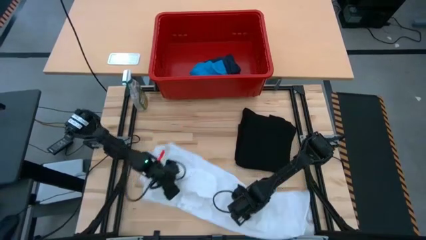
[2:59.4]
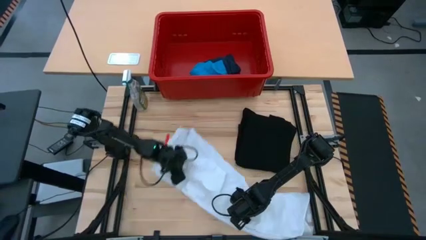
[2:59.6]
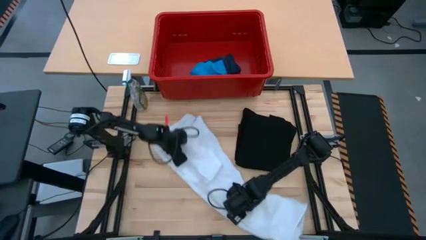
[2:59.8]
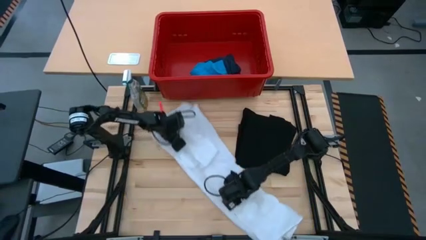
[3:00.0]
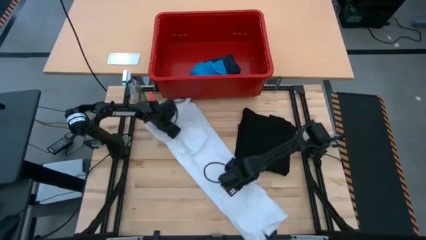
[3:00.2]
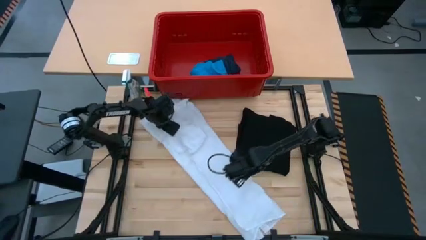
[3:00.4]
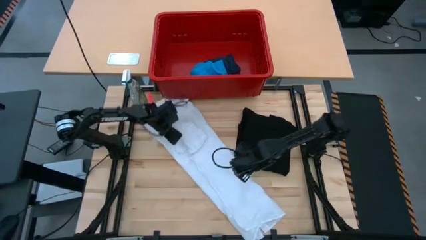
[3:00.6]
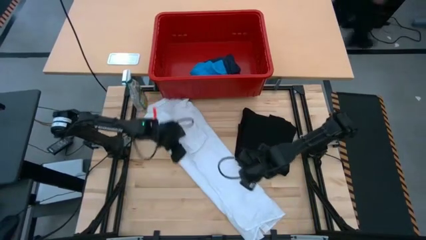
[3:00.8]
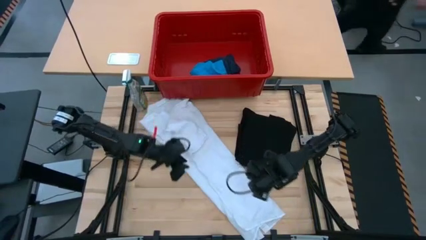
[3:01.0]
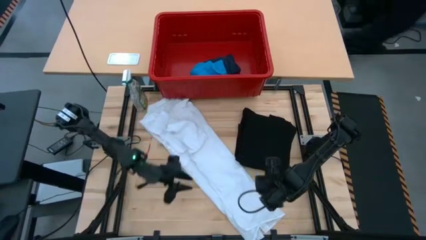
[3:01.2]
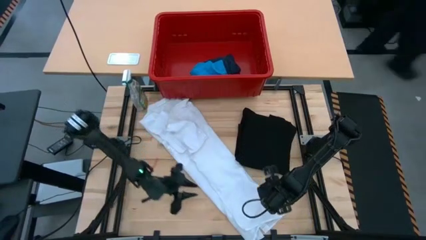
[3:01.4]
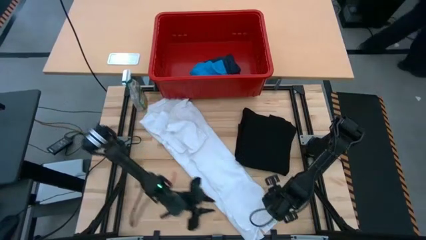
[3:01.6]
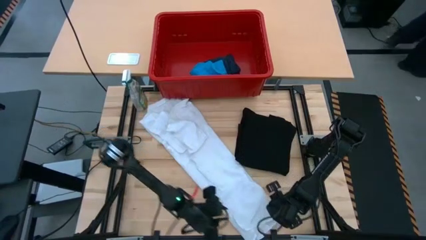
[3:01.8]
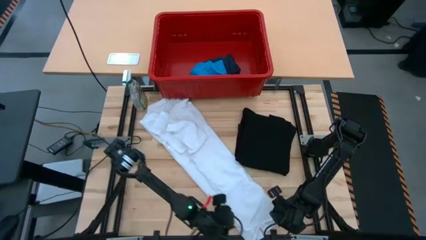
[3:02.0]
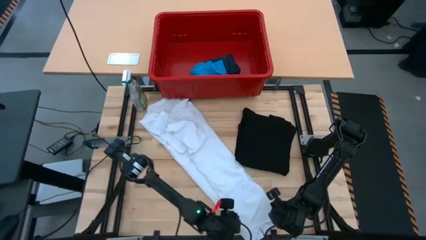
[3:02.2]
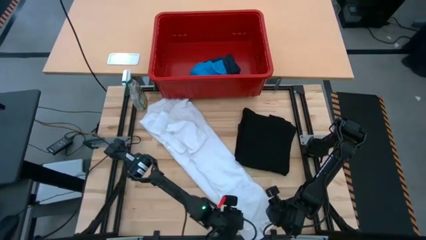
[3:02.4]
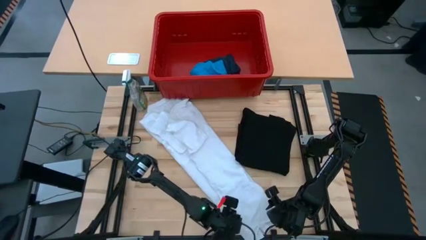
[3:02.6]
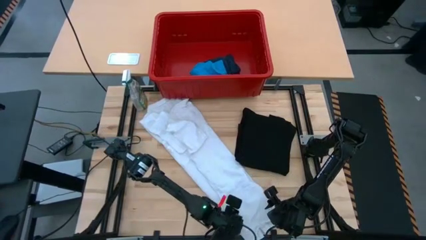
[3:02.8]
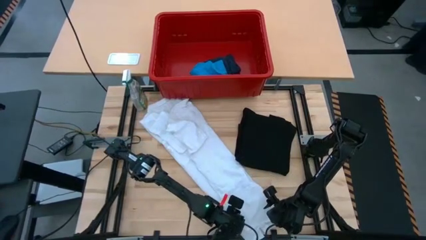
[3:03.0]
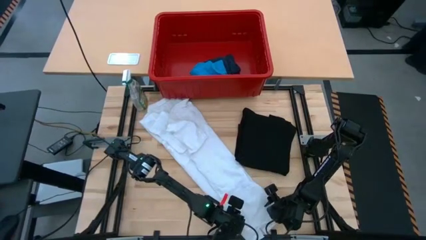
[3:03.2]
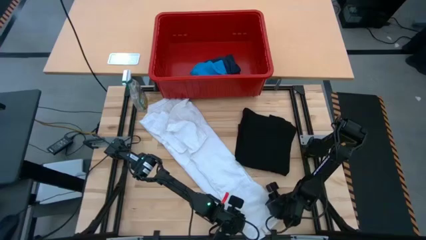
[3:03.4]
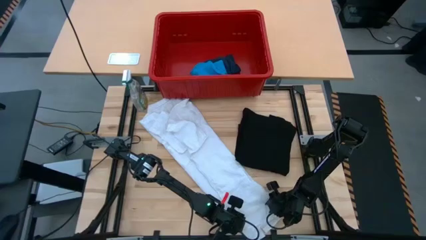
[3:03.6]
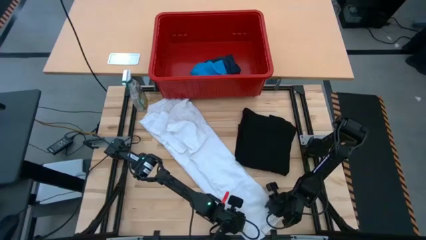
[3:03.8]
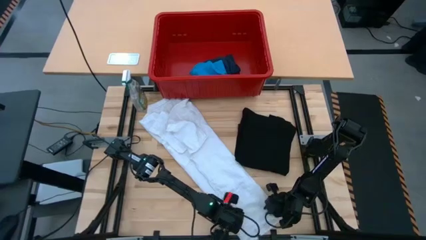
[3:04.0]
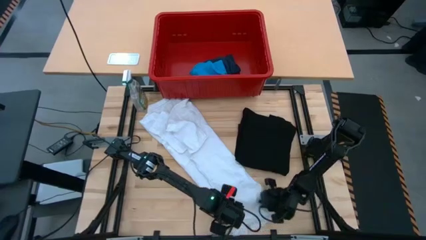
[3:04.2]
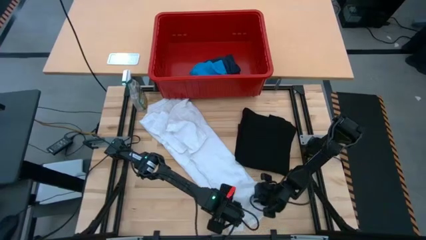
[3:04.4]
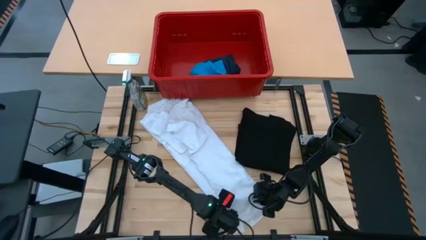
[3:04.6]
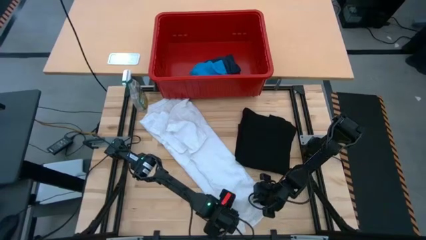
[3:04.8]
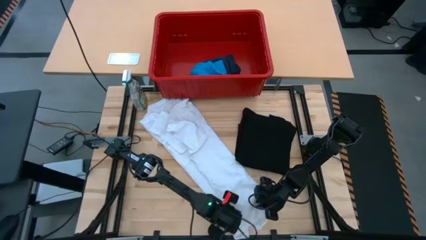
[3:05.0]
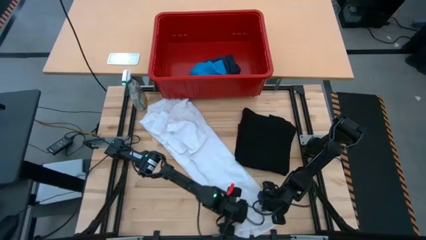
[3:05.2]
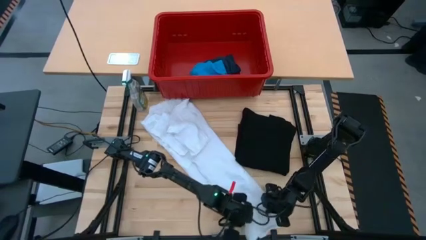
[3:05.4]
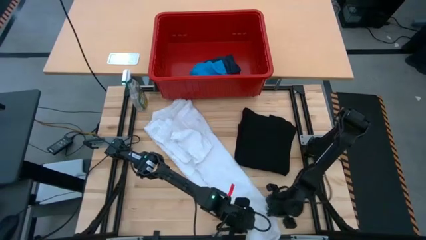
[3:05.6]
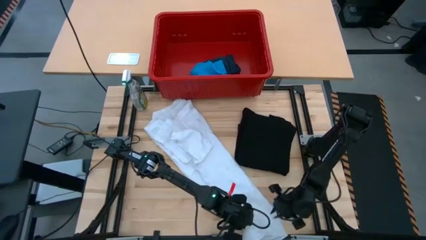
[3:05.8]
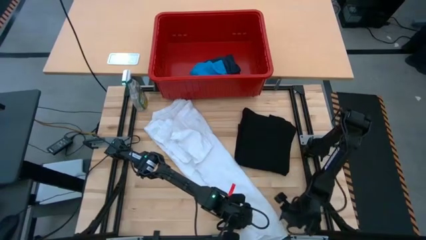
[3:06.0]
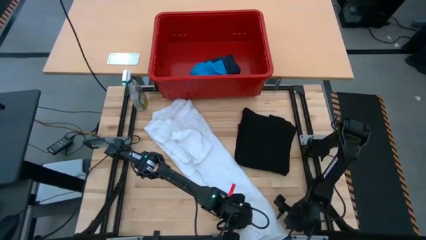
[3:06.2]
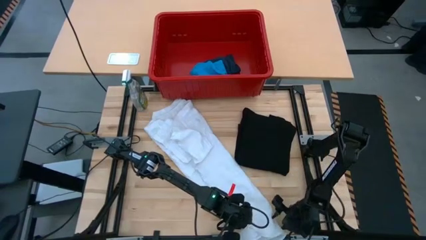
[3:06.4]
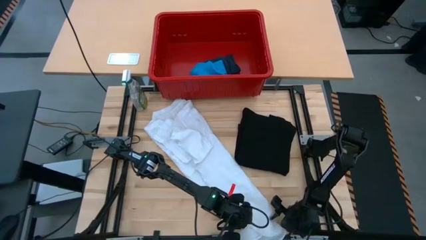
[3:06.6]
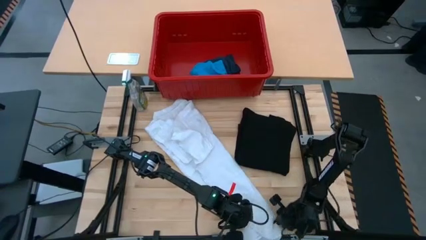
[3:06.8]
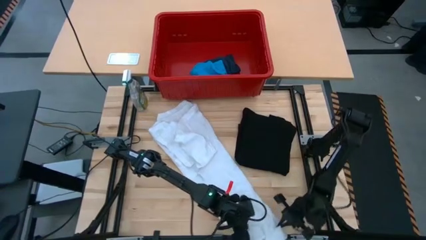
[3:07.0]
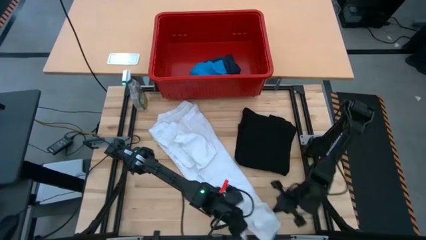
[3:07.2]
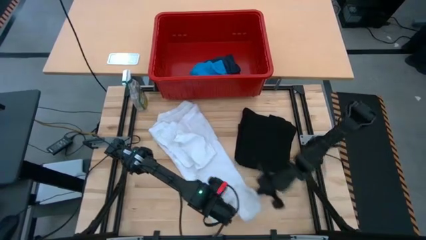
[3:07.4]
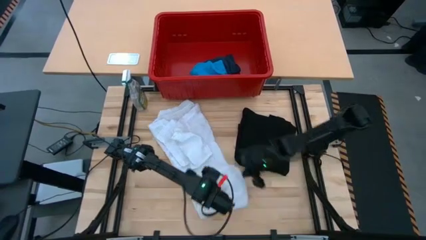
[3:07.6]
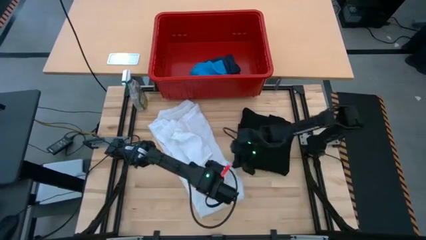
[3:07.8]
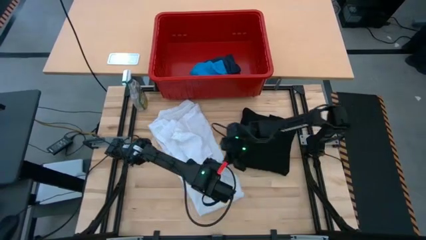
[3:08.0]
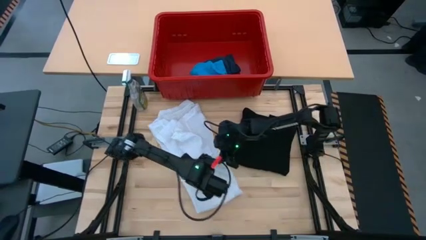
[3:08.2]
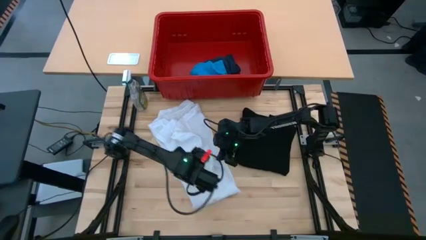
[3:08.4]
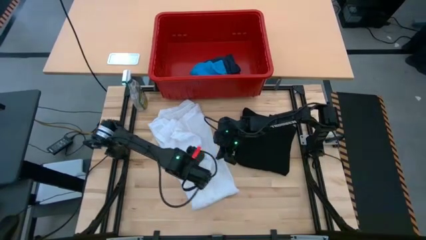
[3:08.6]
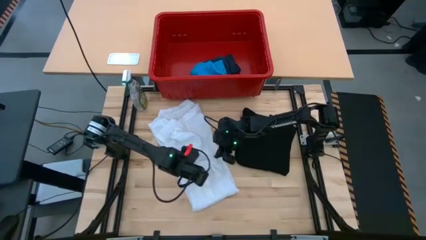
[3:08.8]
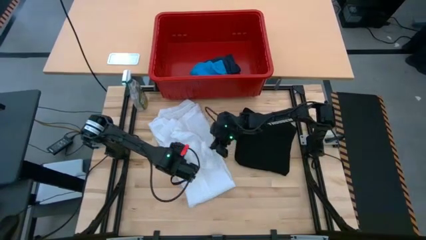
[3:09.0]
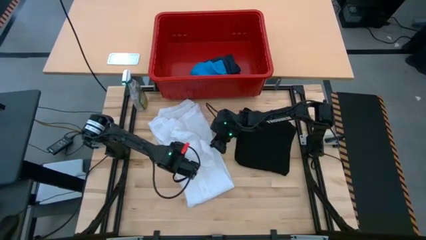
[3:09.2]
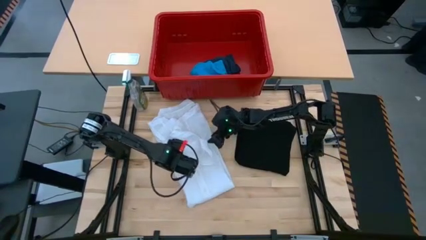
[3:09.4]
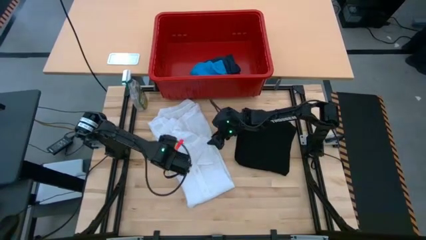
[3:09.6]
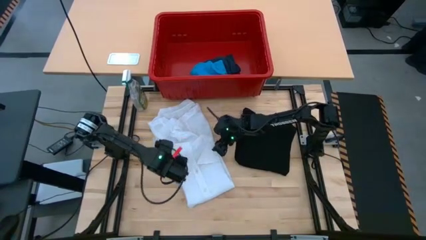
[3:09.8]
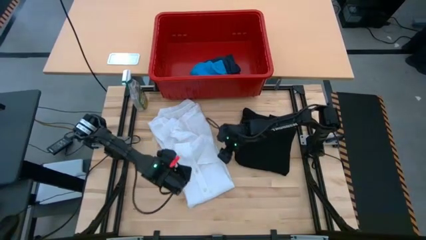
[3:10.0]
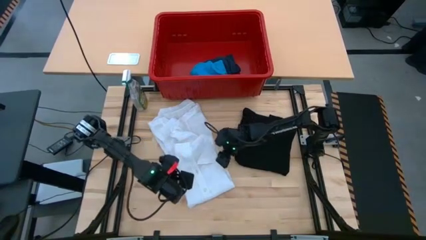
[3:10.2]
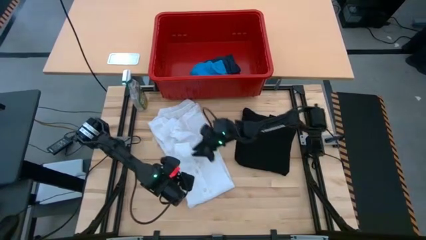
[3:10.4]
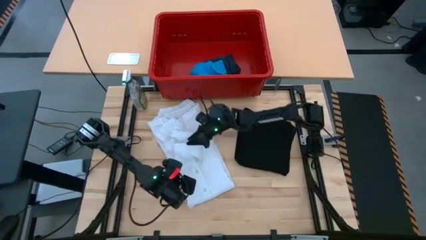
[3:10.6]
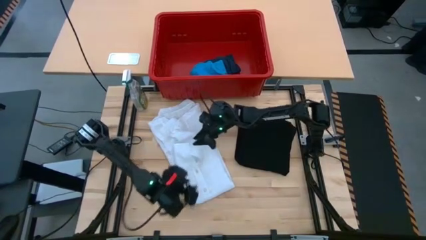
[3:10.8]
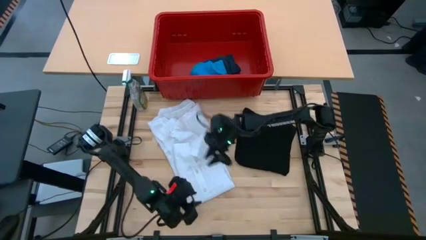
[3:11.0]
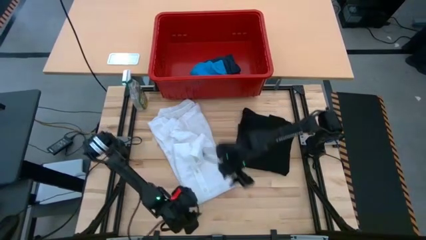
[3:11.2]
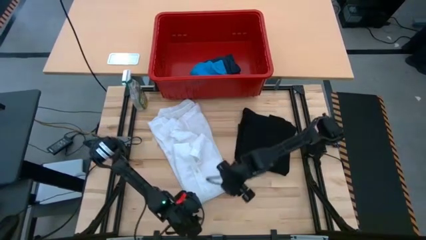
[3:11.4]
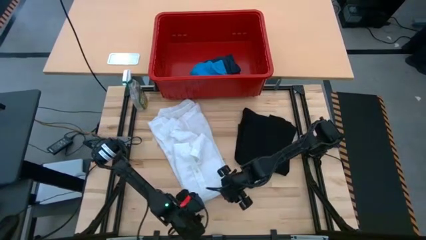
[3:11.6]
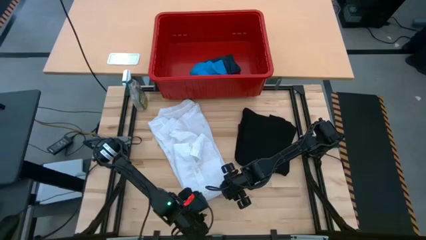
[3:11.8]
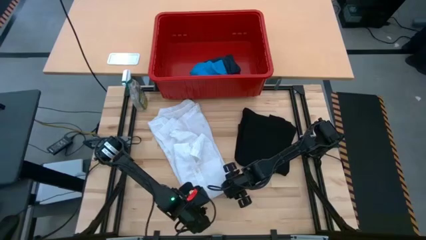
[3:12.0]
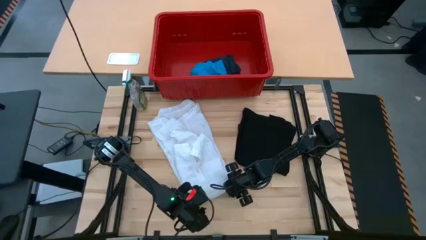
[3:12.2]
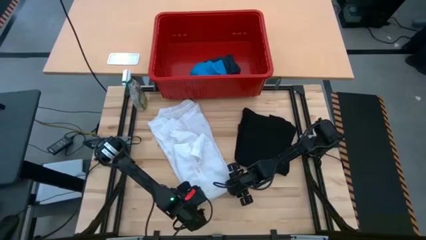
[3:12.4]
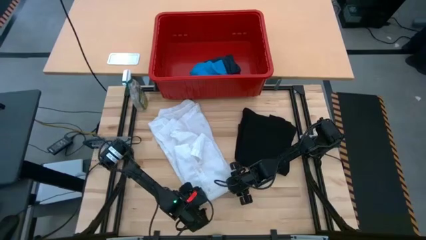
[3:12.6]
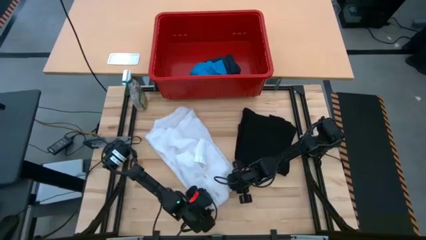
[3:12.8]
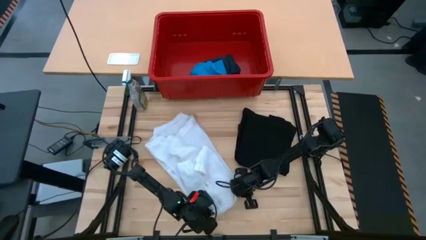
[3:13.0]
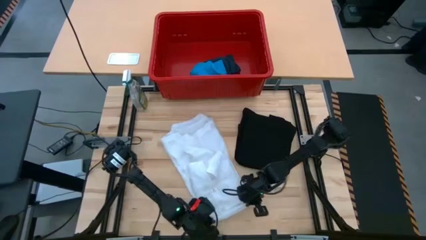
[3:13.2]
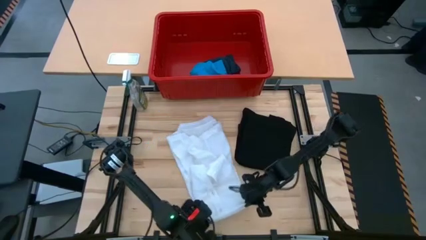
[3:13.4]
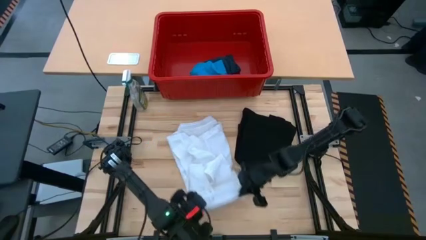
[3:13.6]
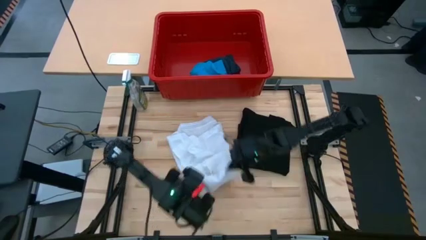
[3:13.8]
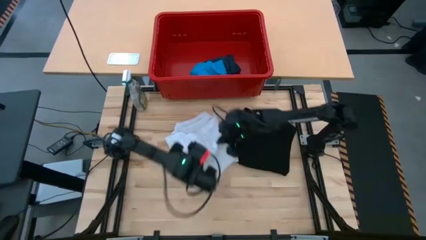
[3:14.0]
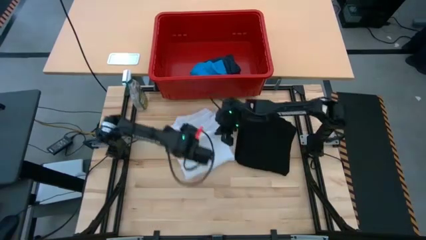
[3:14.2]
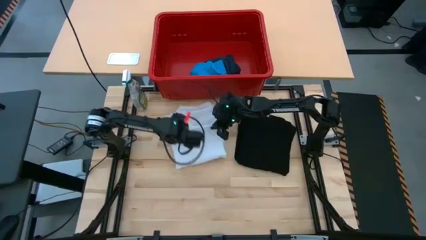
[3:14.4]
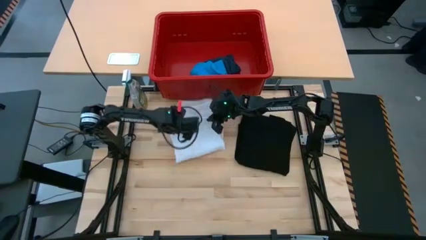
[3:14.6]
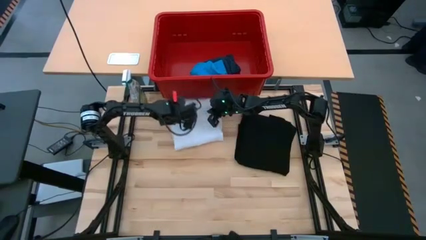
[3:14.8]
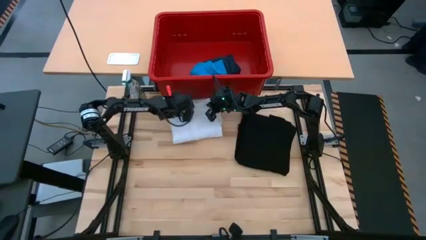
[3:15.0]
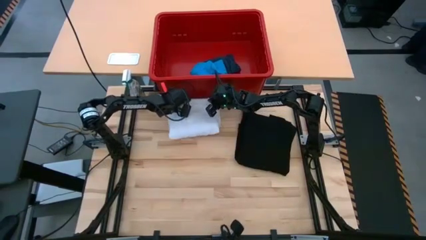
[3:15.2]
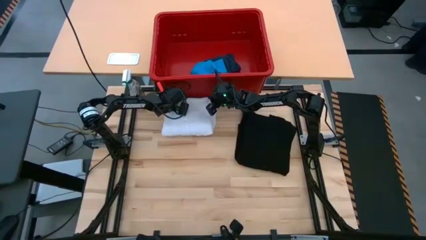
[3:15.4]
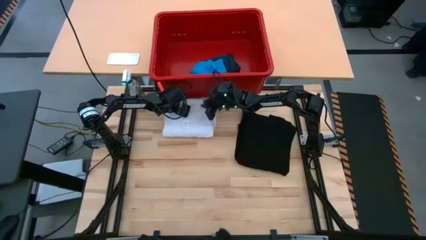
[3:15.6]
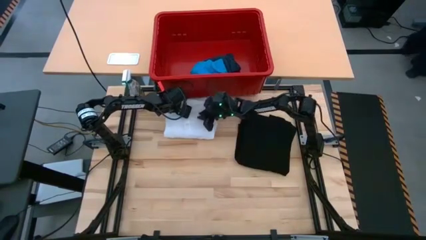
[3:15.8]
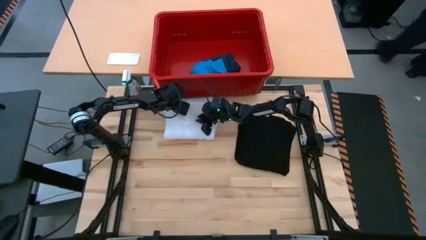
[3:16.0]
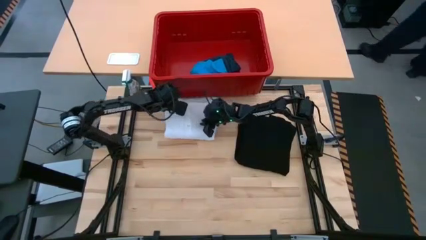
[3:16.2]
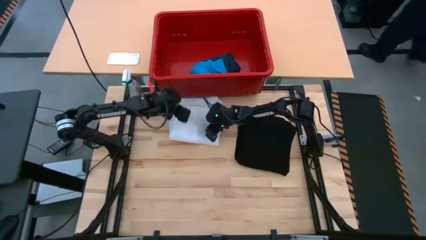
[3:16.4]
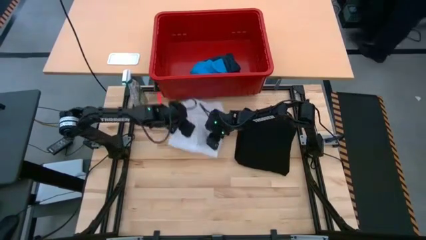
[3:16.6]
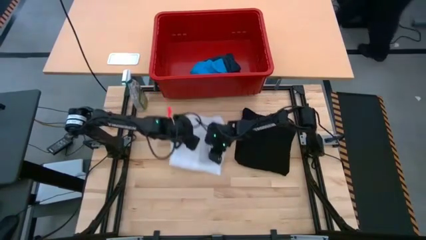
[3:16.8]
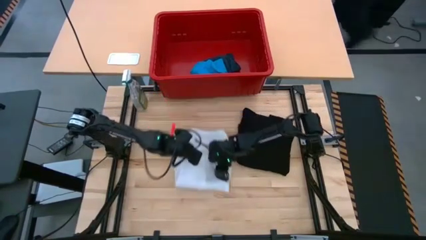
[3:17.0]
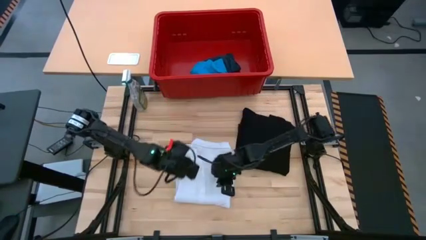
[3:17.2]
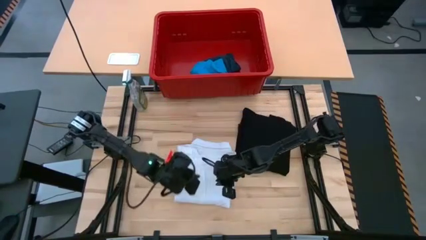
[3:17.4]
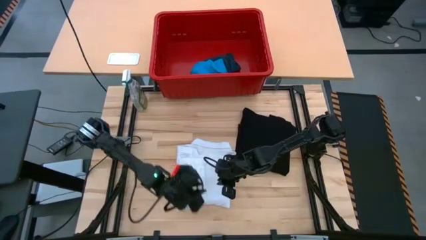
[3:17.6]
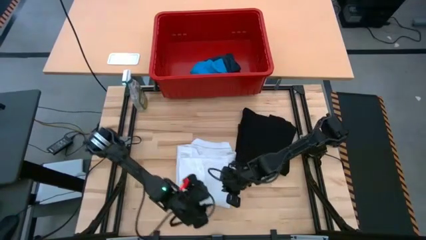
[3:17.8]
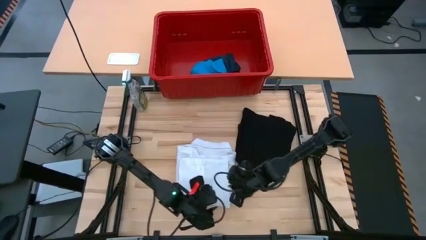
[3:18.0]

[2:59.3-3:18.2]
Task: Fold laundry
Fold the white polo shirt on the table
